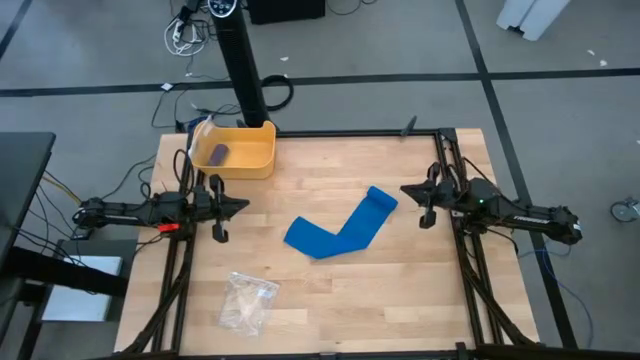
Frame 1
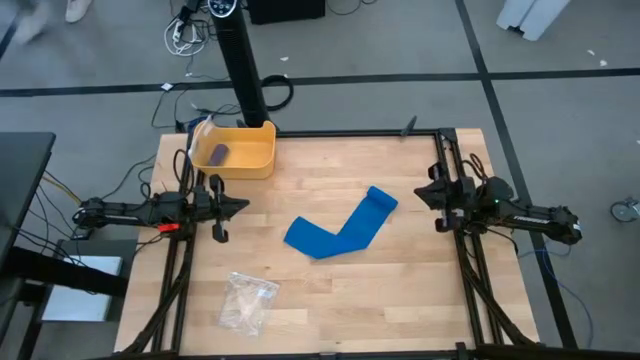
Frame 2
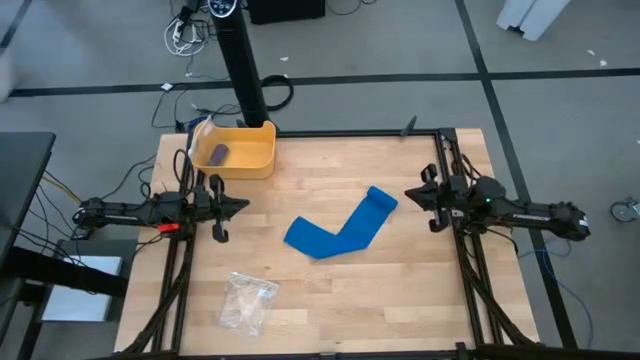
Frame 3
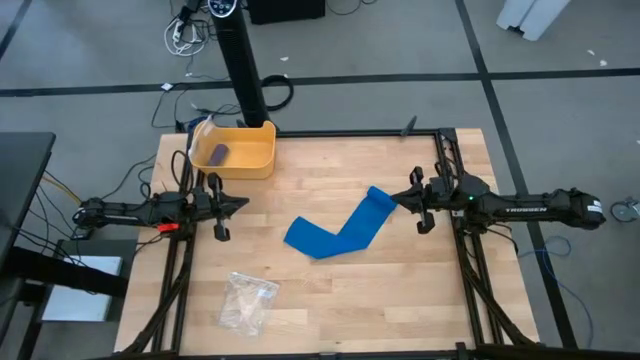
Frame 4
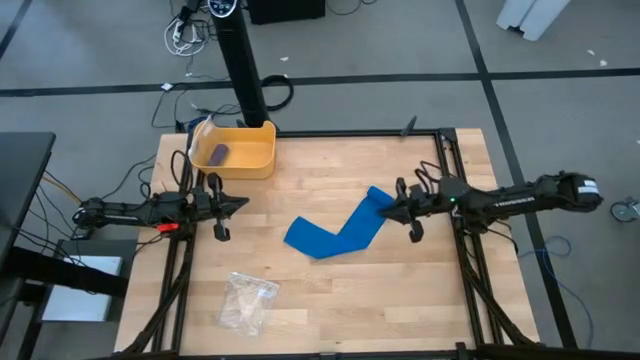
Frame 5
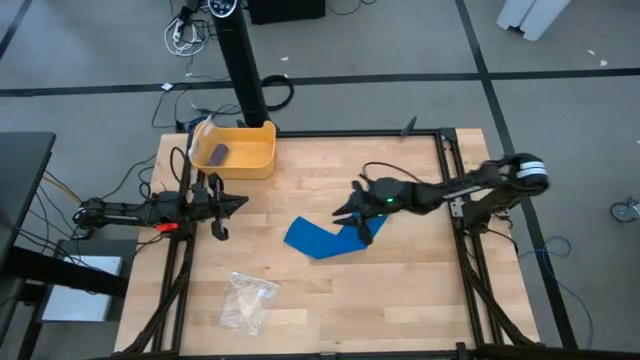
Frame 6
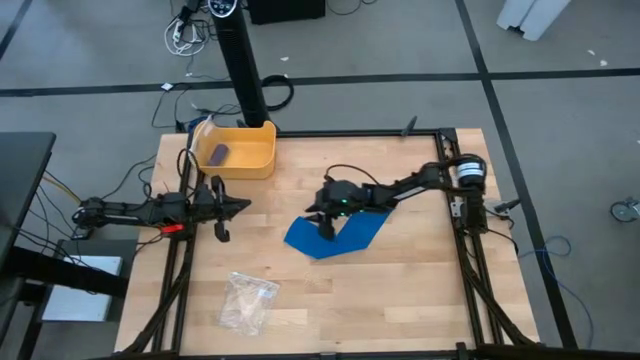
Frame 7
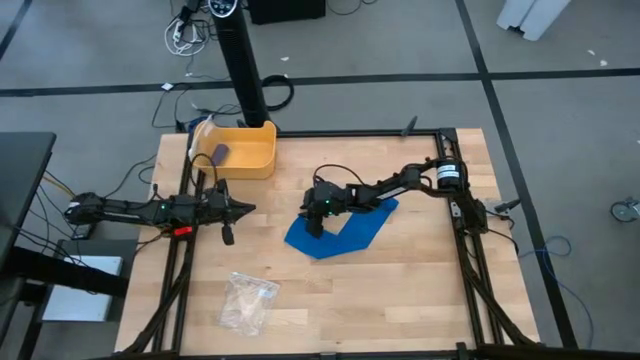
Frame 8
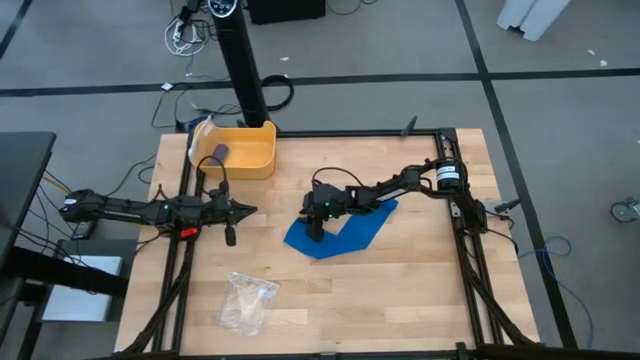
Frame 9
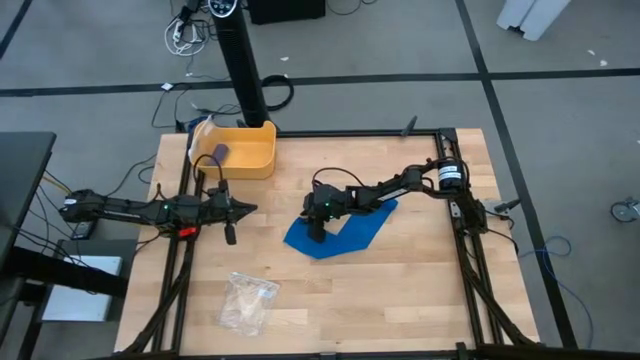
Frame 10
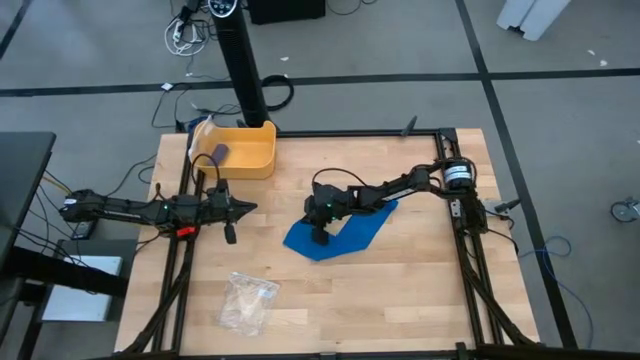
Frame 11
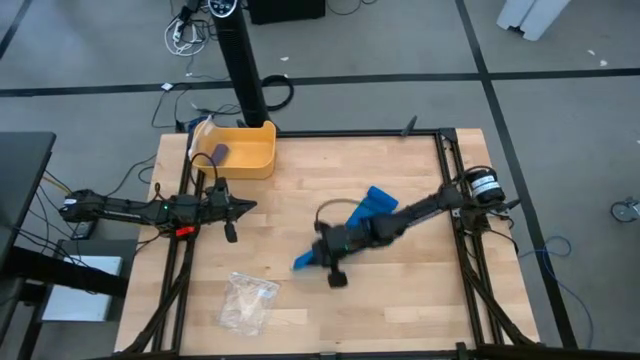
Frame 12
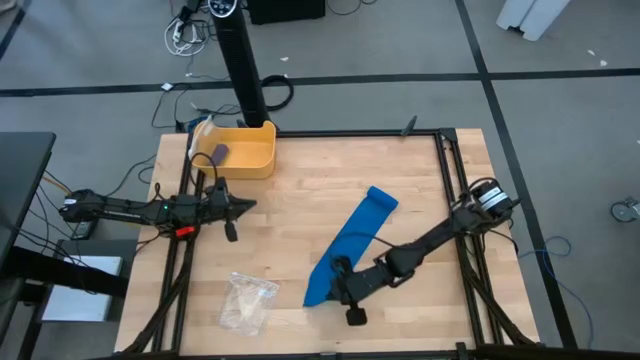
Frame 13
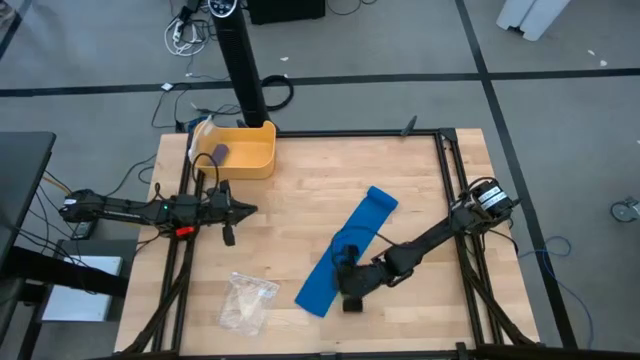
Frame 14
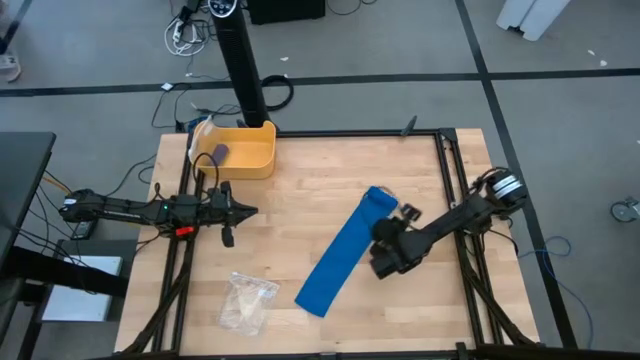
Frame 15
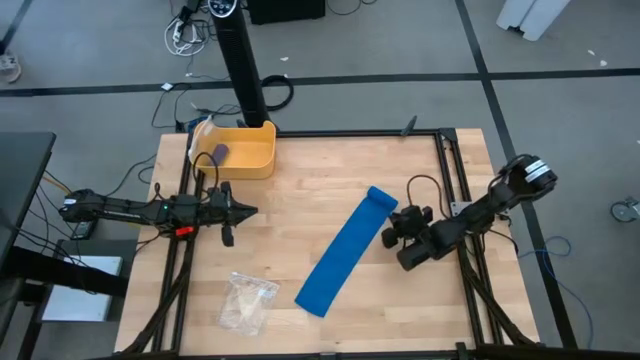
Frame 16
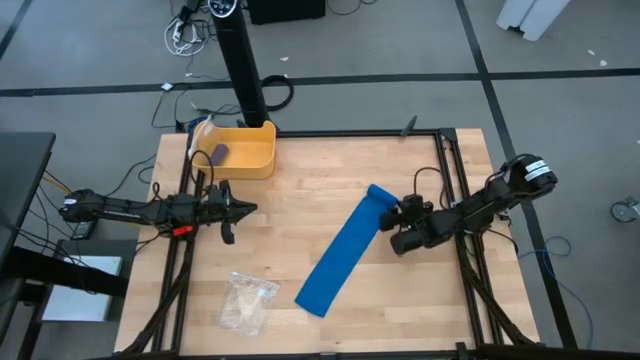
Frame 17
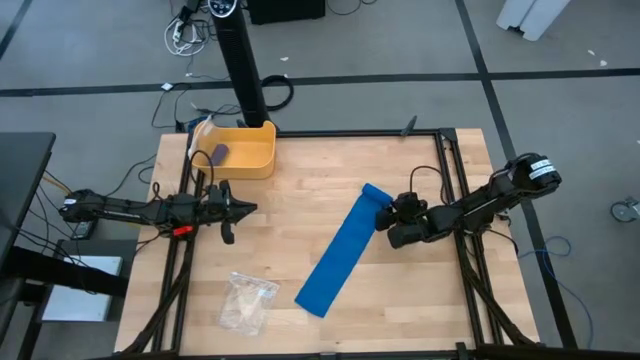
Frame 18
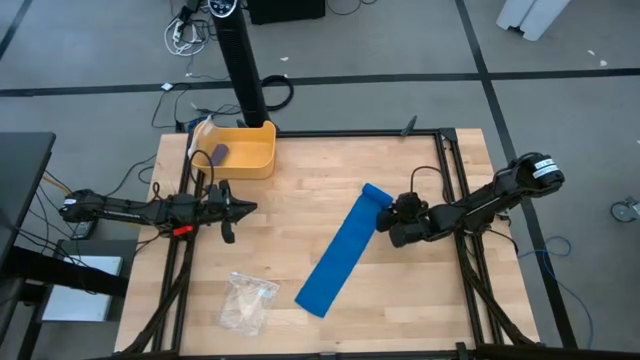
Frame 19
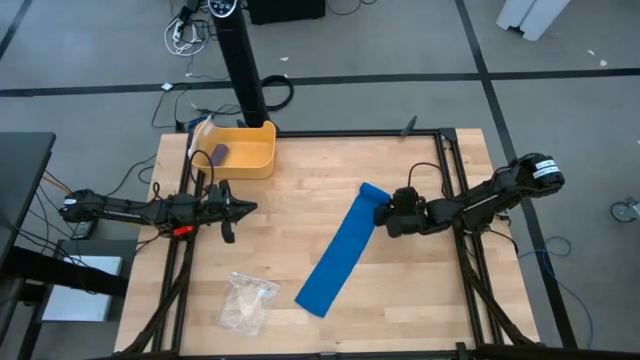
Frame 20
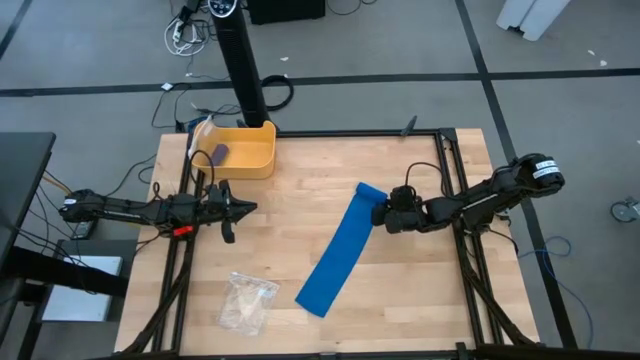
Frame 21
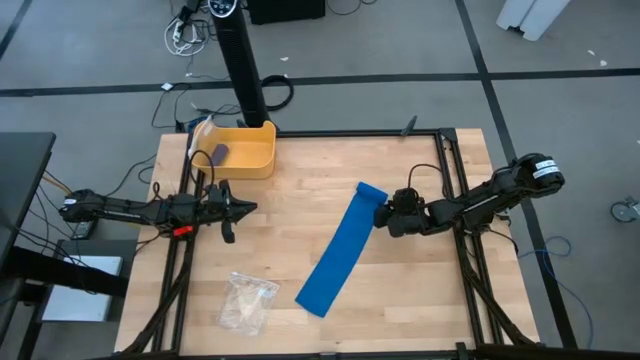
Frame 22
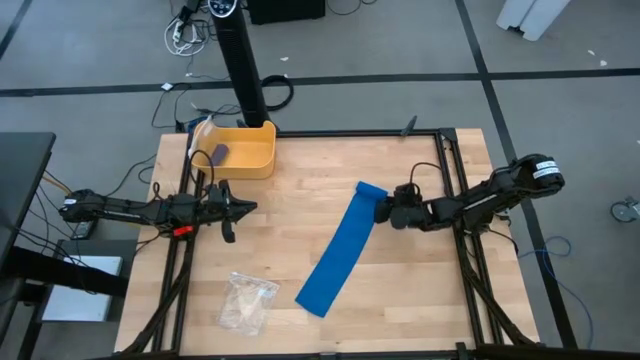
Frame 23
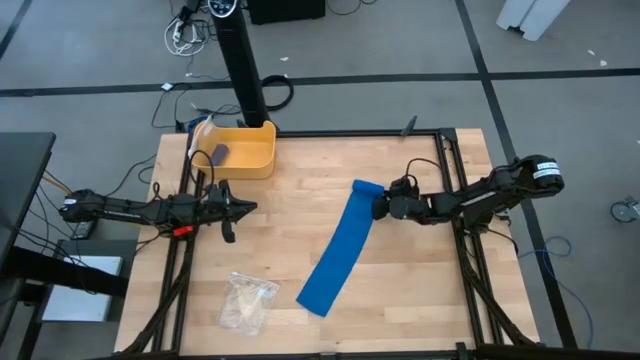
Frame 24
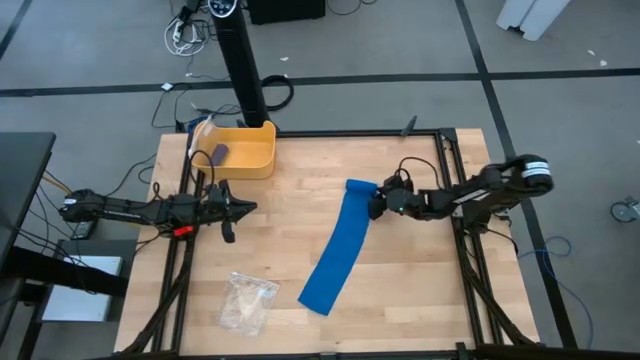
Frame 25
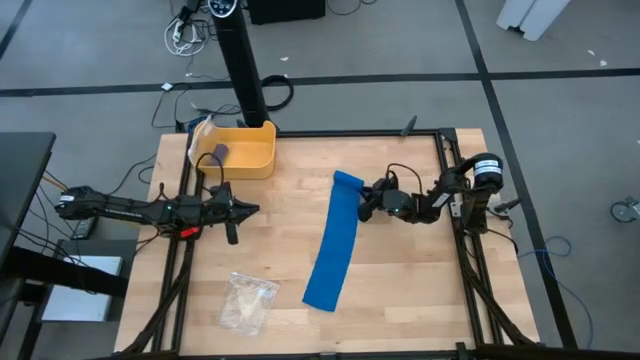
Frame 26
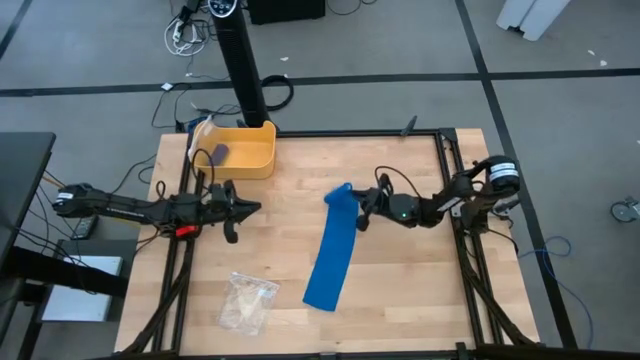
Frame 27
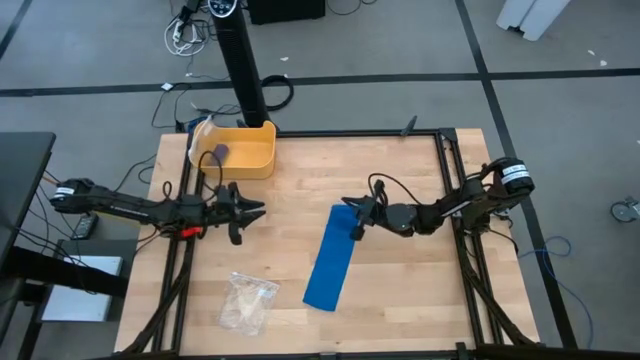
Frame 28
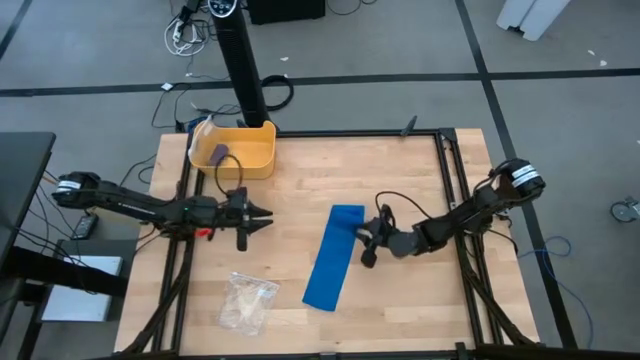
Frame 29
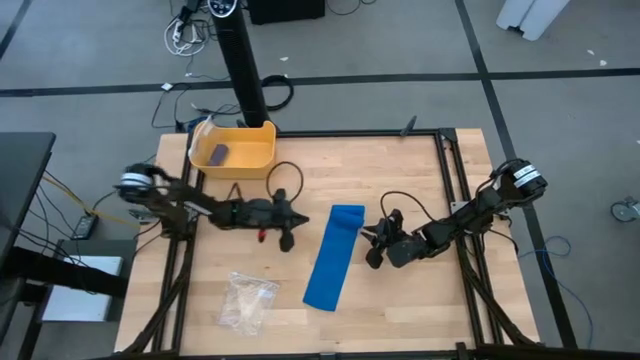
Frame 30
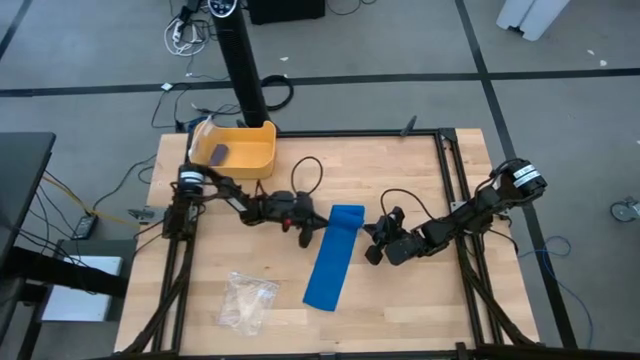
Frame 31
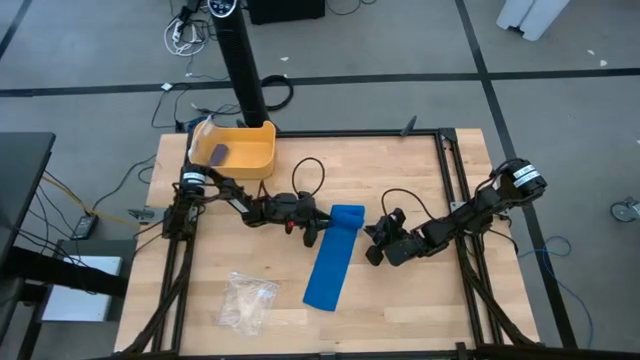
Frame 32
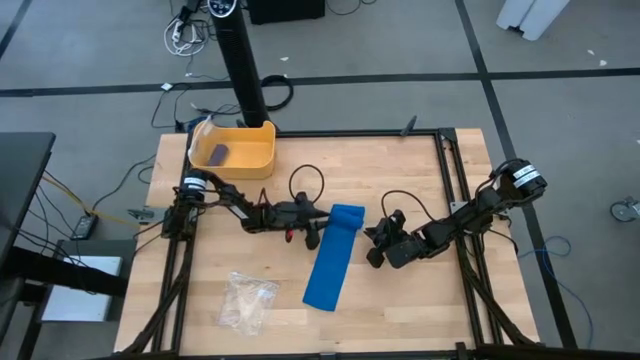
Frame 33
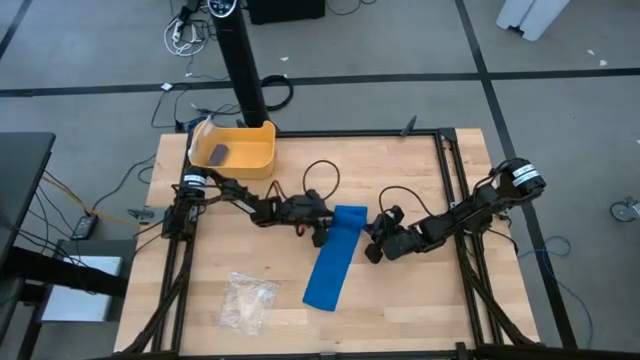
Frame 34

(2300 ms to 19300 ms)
Task: Roll bandage
Roll the blue bandage
